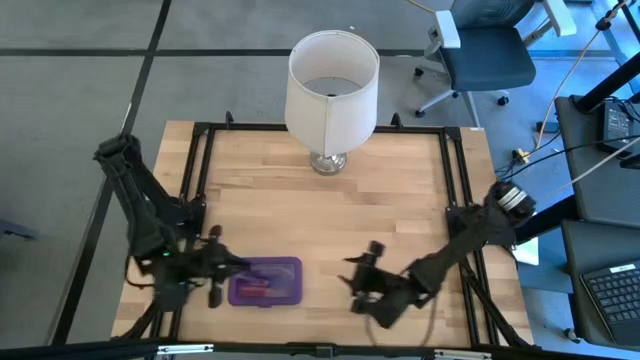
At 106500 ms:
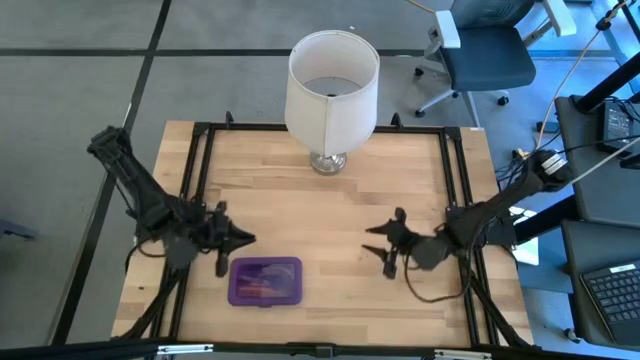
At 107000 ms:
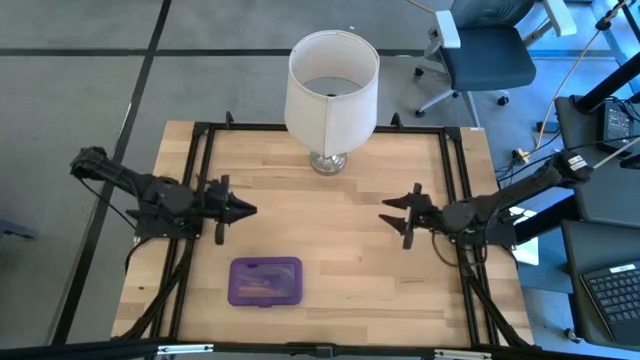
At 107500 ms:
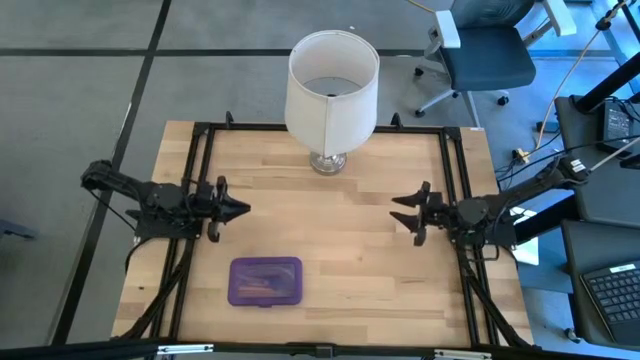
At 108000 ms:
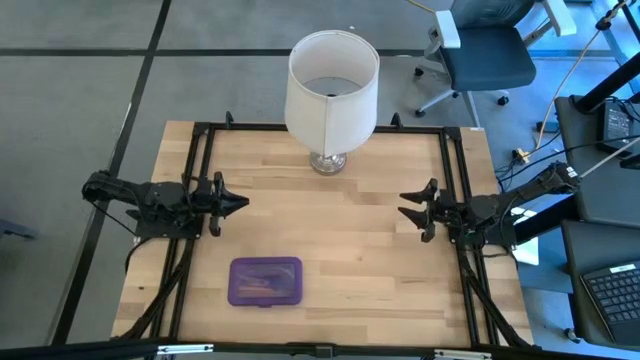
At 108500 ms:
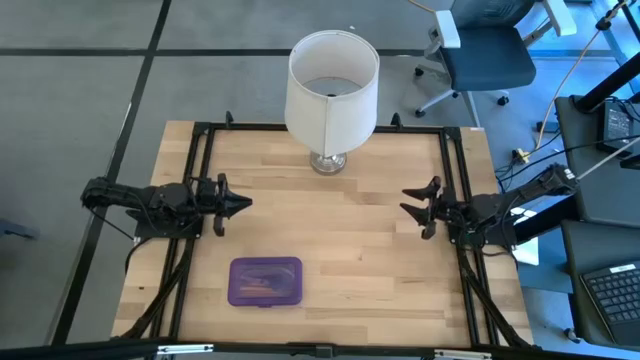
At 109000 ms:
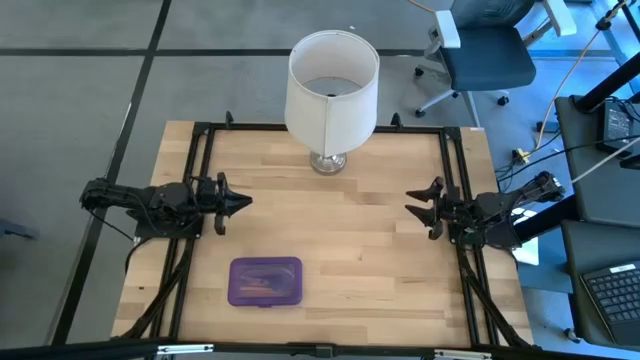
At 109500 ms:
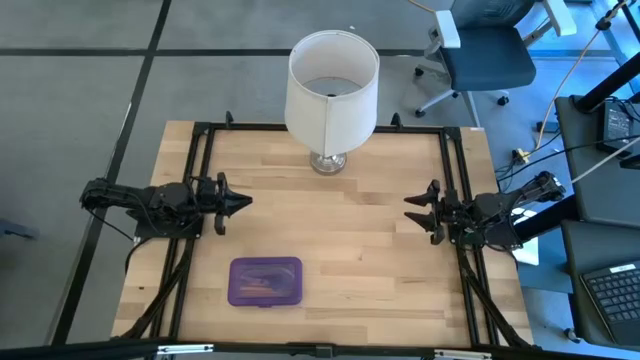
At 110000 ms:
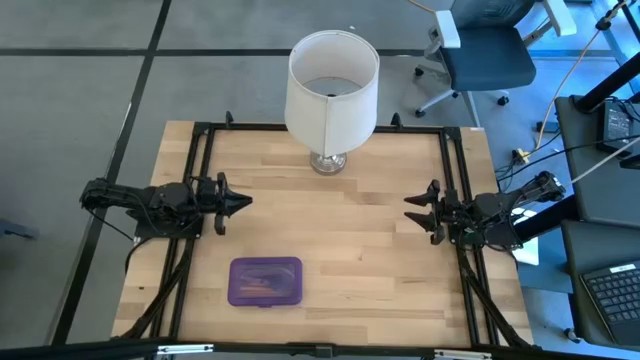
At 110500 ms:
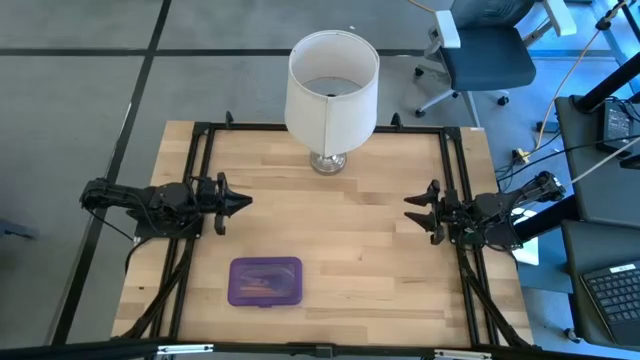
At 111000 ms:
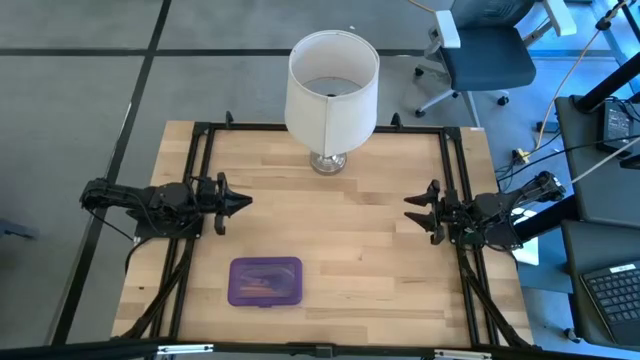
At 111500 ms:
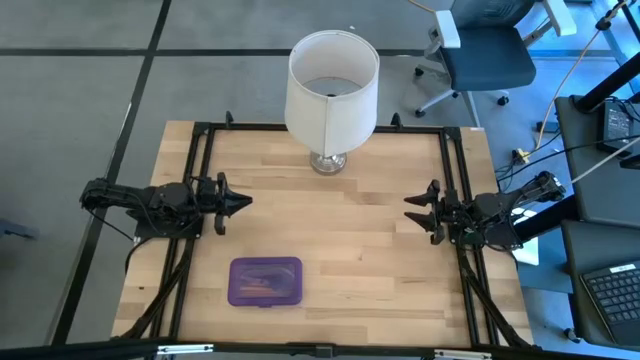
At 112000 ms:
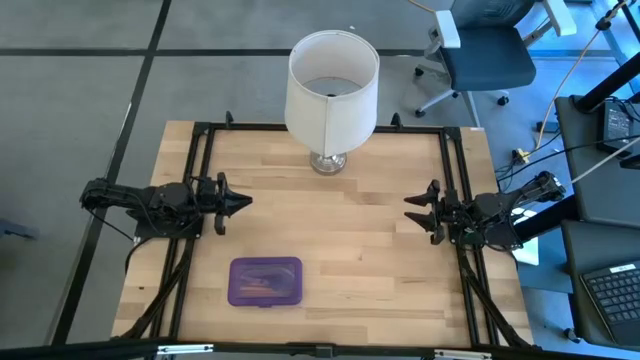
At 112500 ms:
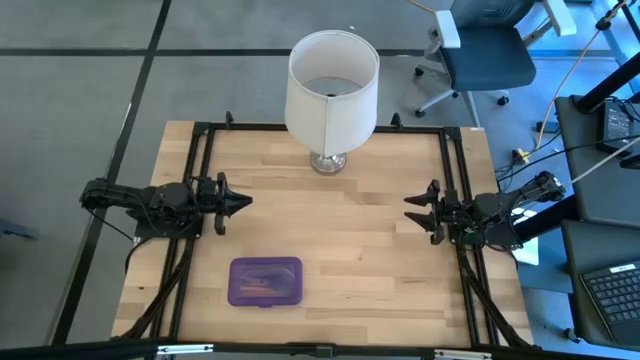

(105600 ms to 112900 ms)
Task: Pick & place school supplies into a supply box
Return to Home Position

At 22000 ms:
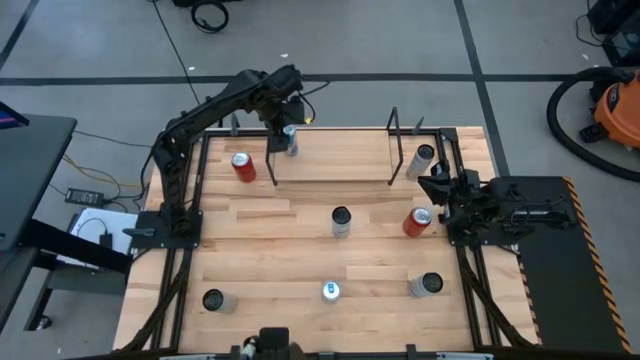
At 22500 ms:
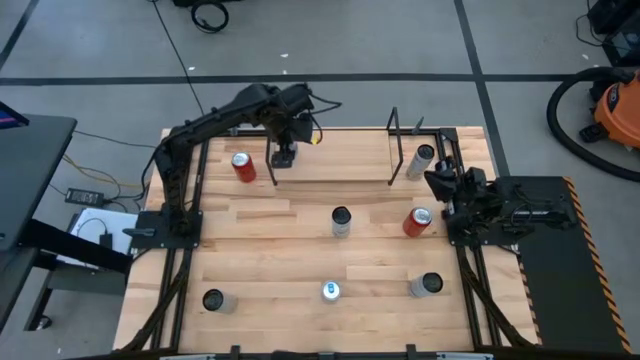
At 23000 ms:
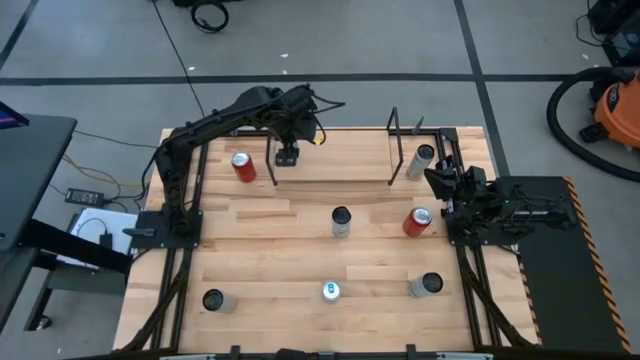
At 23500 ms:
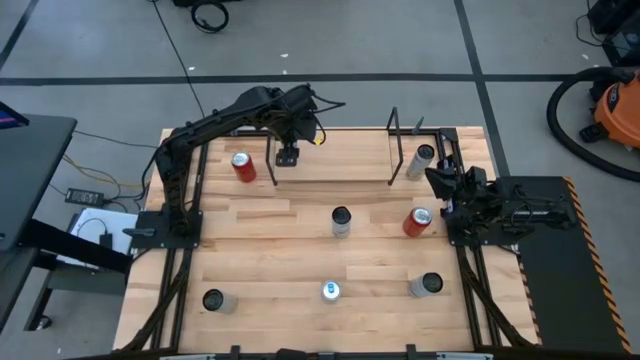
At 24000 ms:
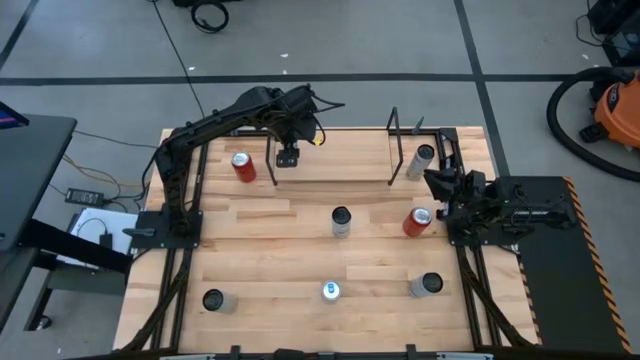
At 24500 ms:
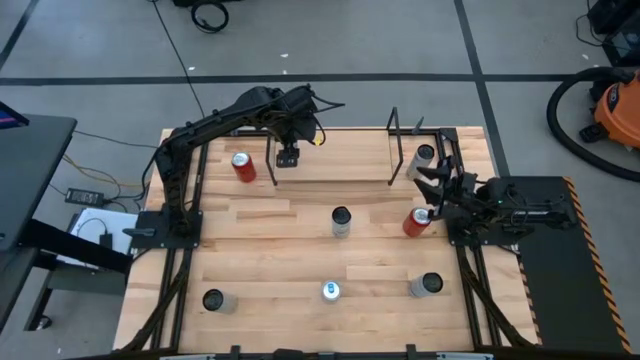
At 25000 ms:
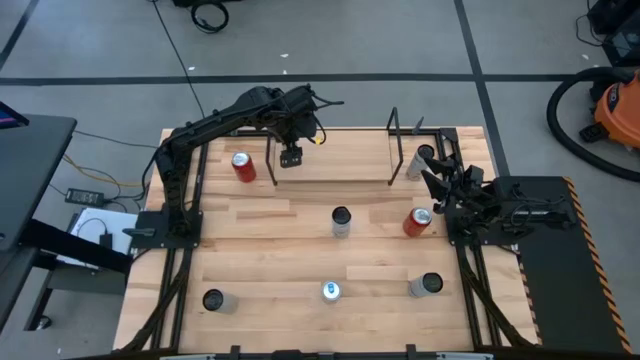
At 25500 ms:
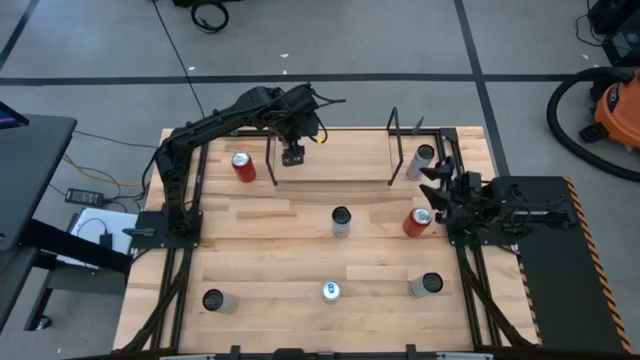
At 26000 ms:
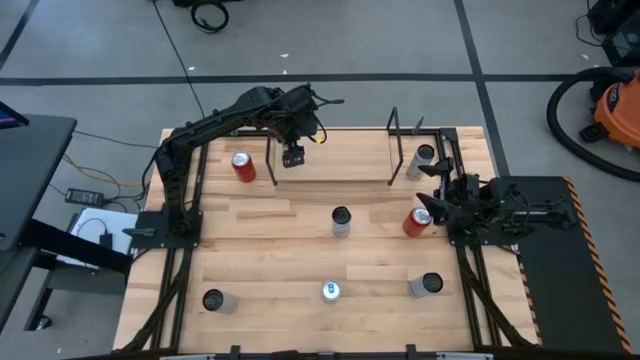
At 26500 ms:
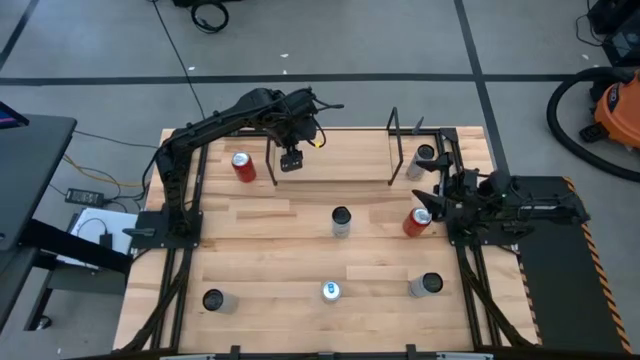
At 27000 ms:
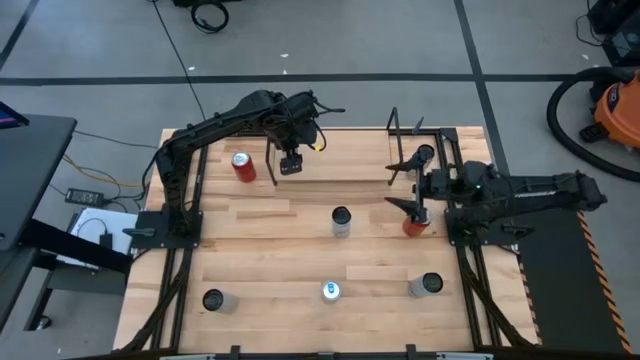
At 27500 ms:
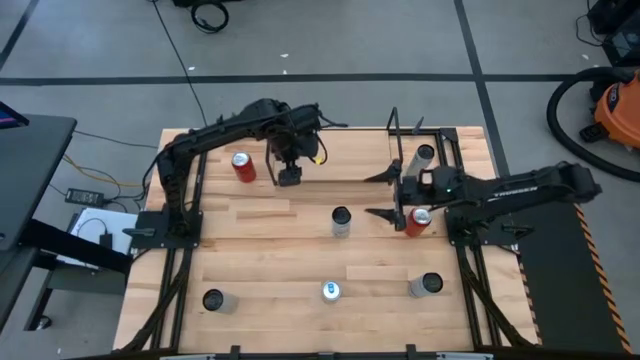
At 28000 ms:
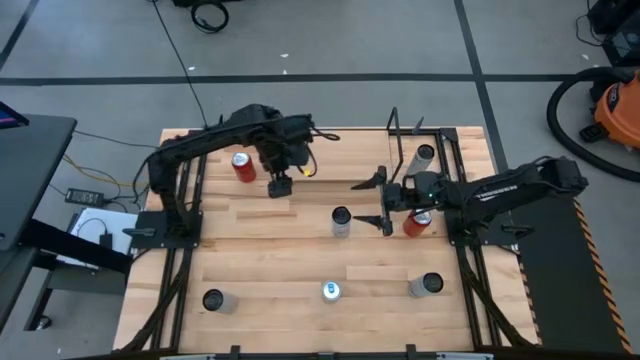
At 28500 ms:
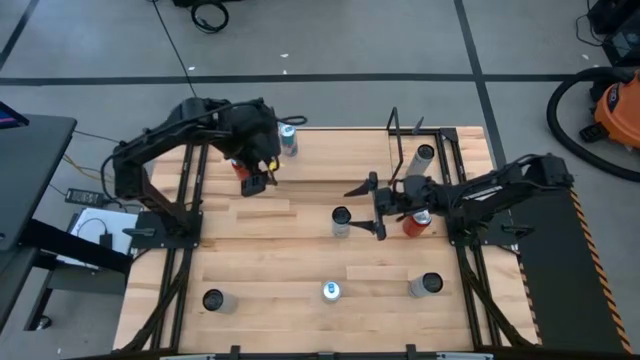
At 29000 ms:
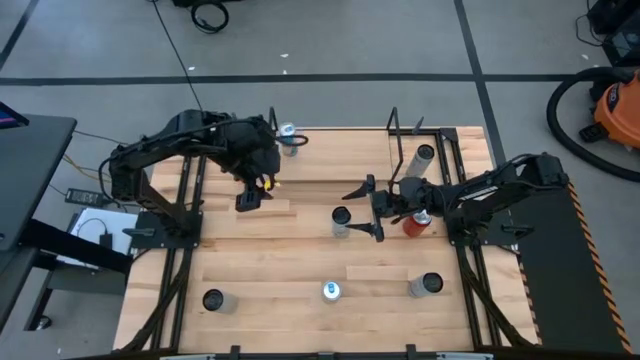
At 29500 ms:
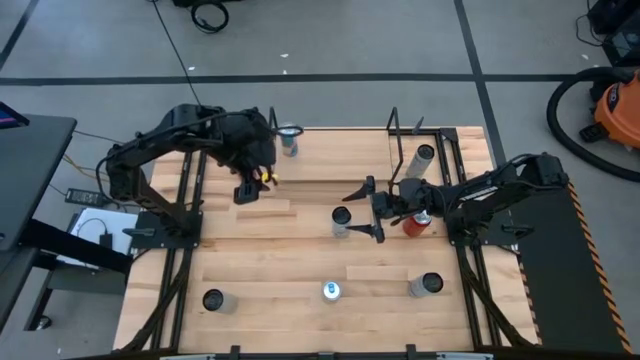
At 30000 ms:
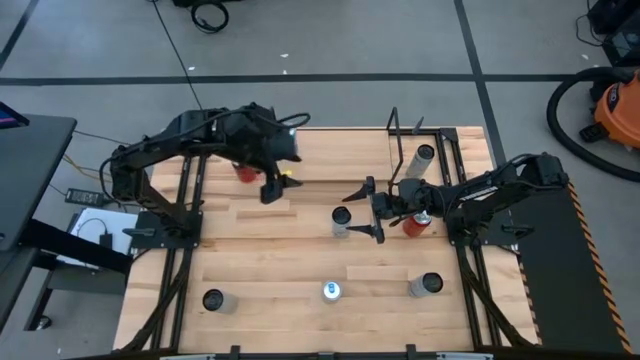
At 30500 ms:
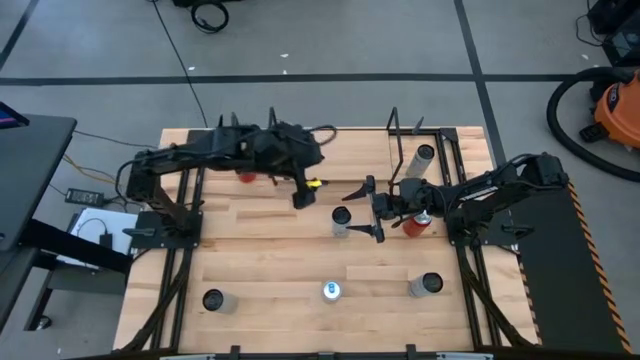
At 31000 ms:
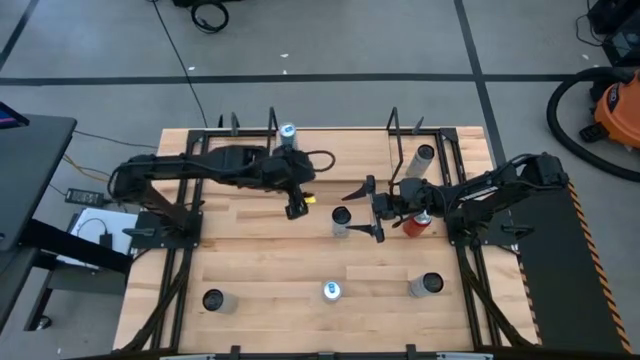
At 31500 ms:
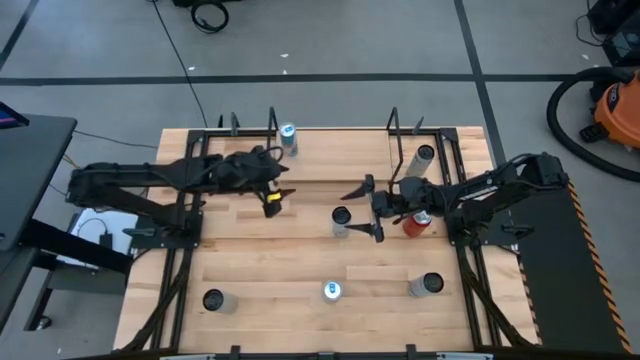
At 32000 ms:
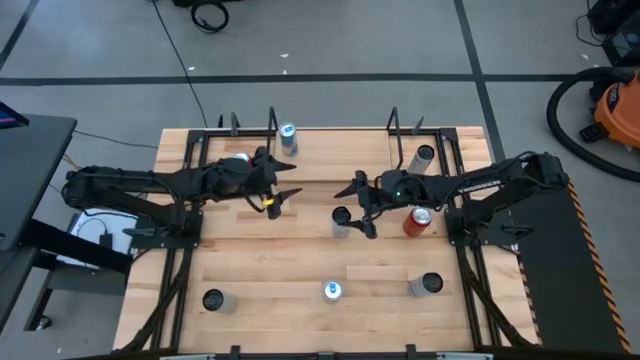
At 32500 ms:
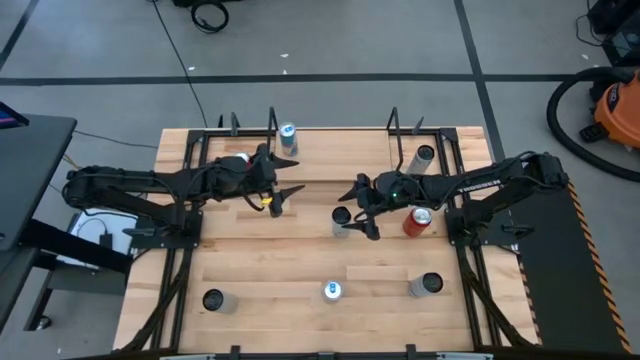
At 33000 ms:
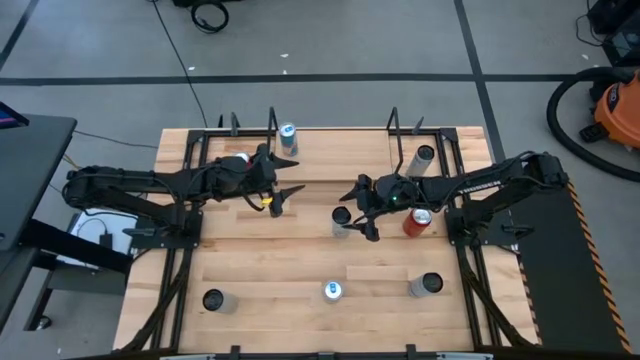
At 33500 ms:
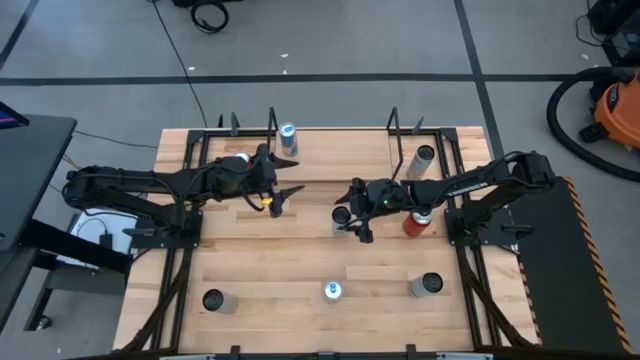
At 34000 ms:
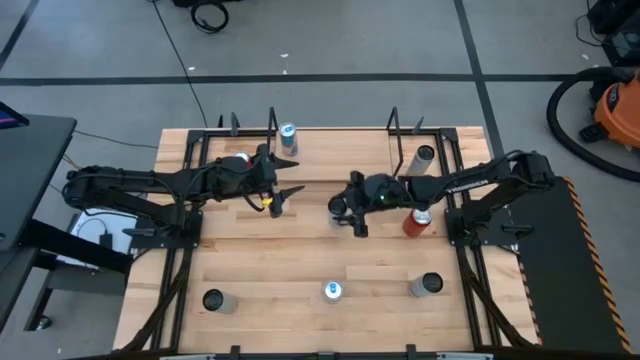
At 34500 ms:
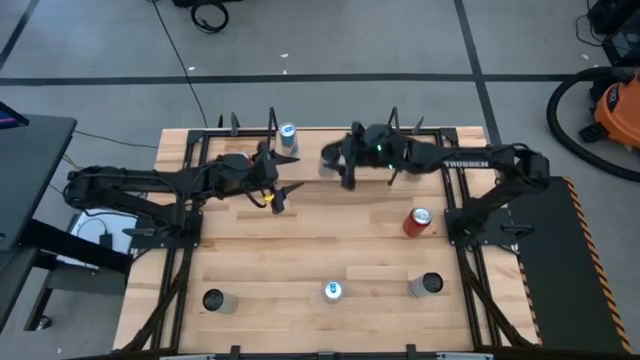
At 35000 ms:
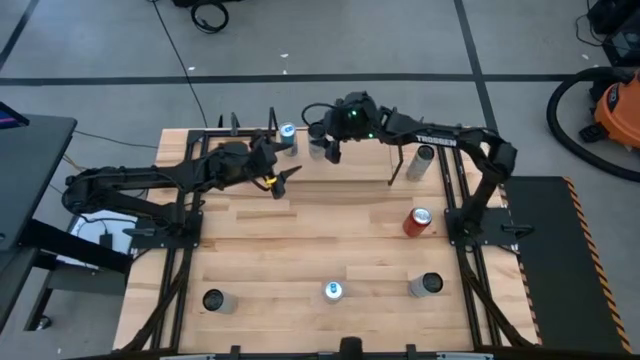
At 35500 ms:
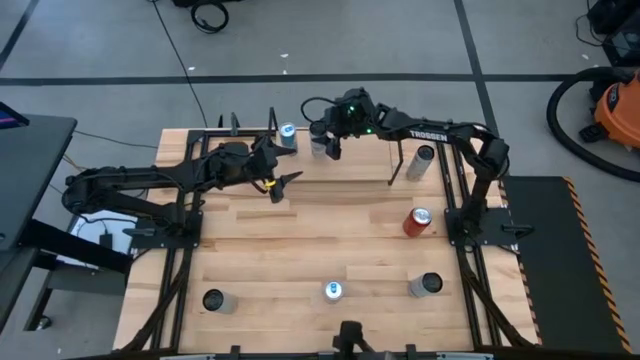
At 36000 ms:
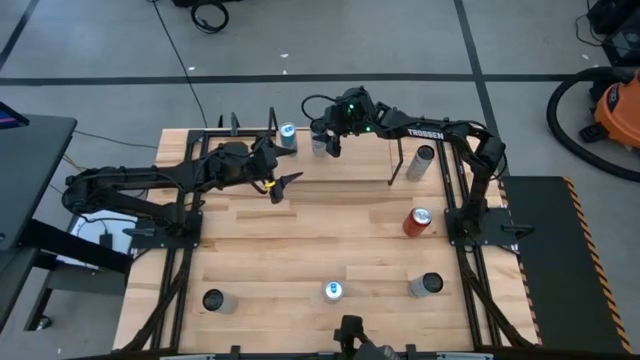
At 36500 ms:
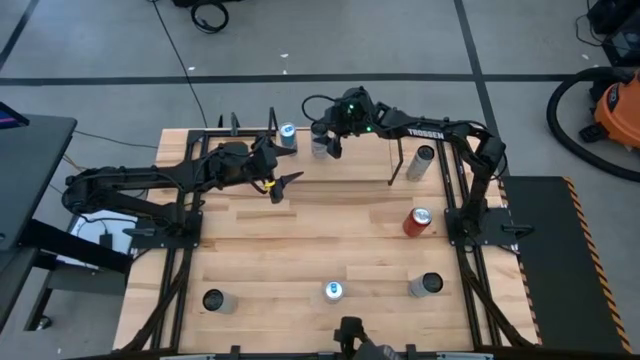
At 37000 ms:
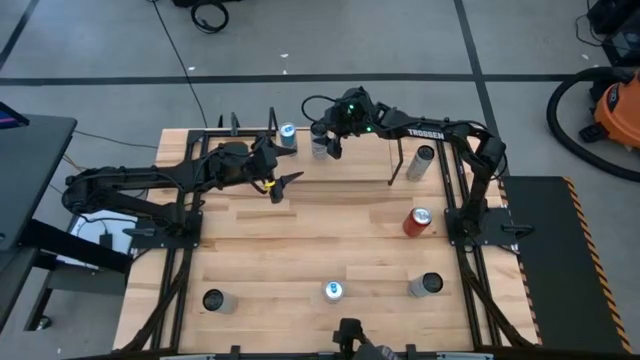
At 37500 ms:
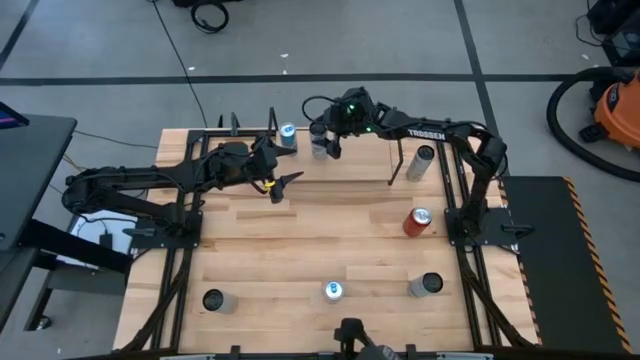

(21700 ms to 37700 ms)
Task: Place canned beverage on shelf
Put the top white-blue soda can on the shelf
